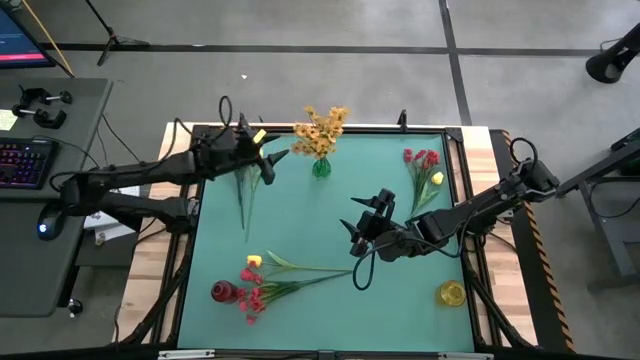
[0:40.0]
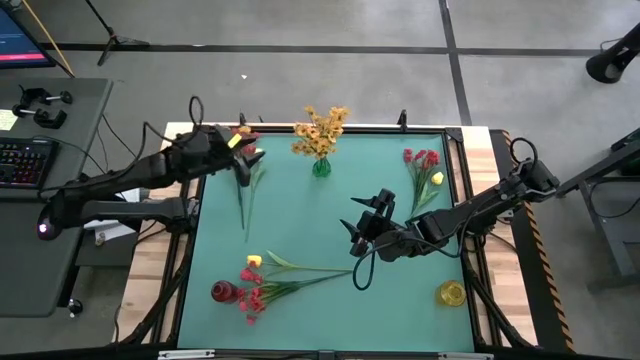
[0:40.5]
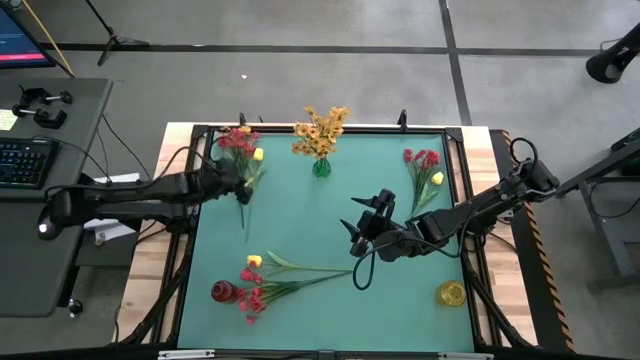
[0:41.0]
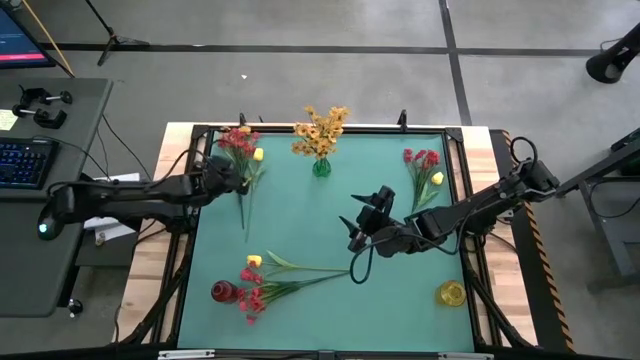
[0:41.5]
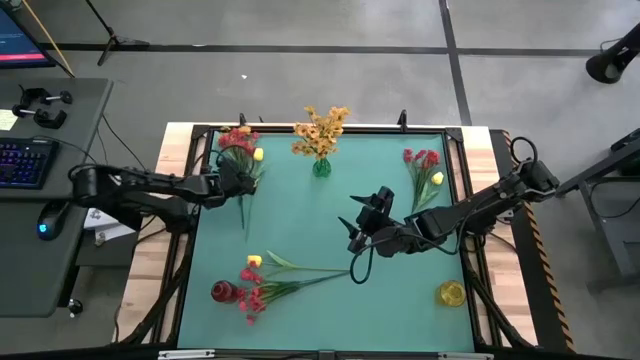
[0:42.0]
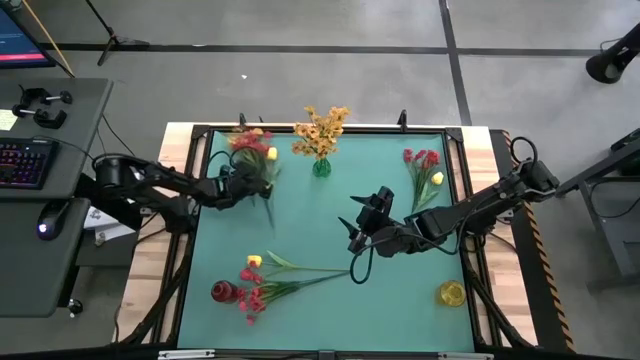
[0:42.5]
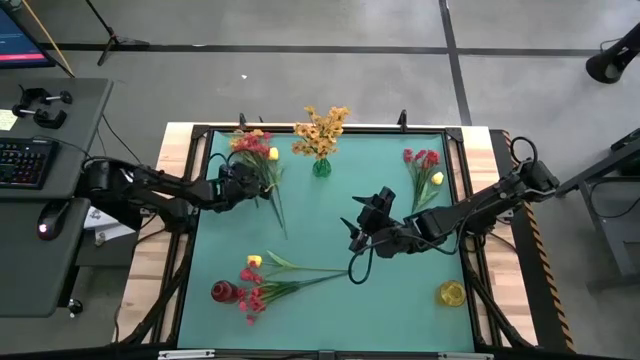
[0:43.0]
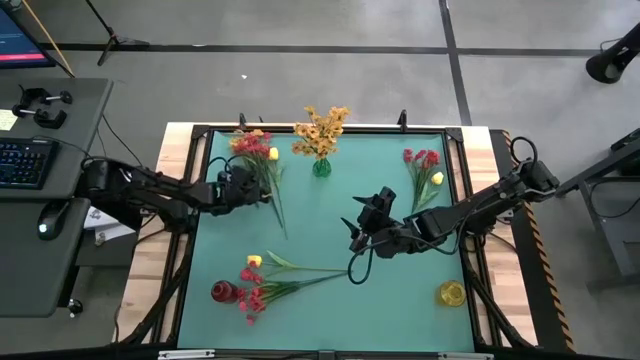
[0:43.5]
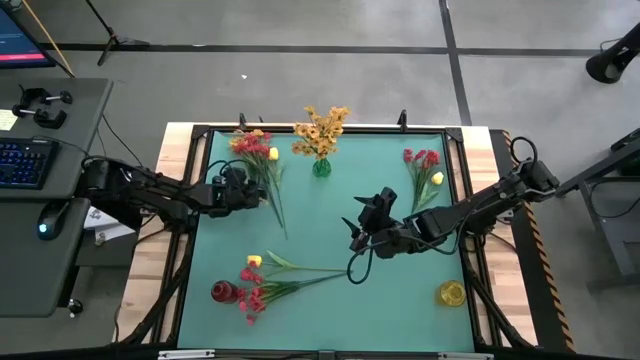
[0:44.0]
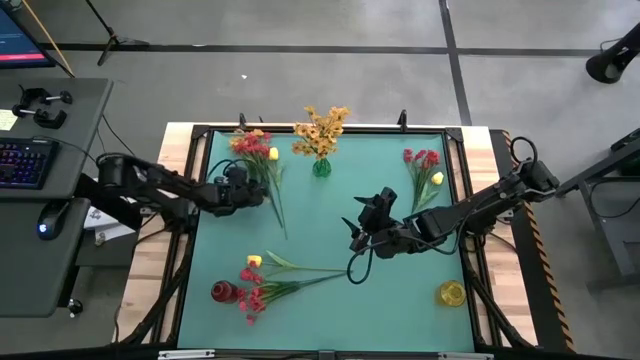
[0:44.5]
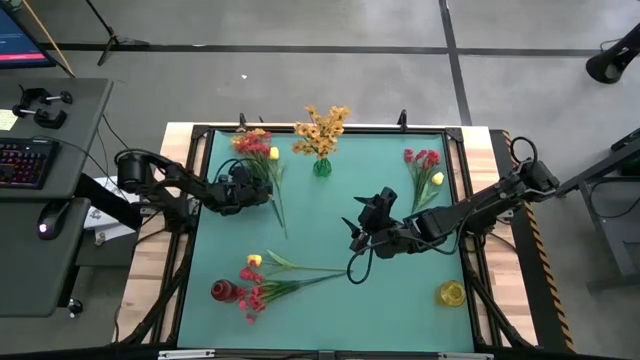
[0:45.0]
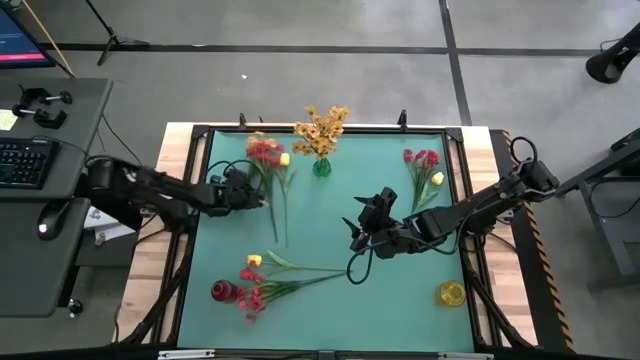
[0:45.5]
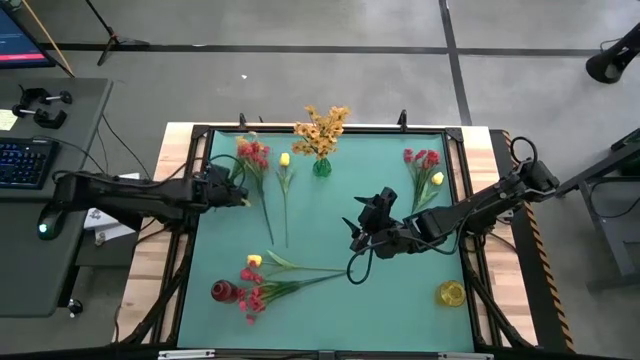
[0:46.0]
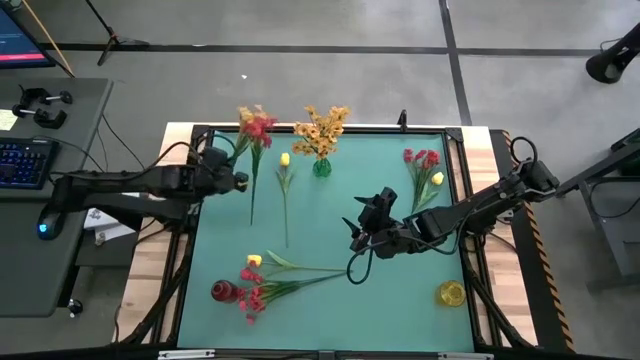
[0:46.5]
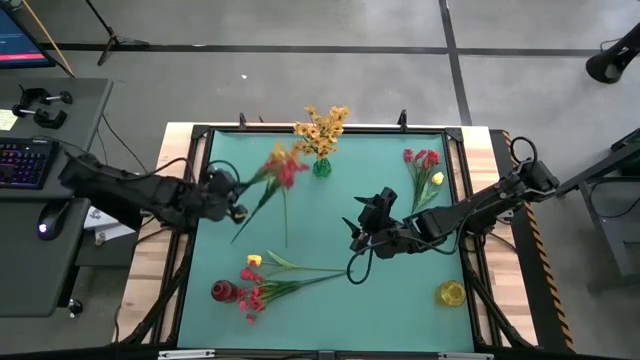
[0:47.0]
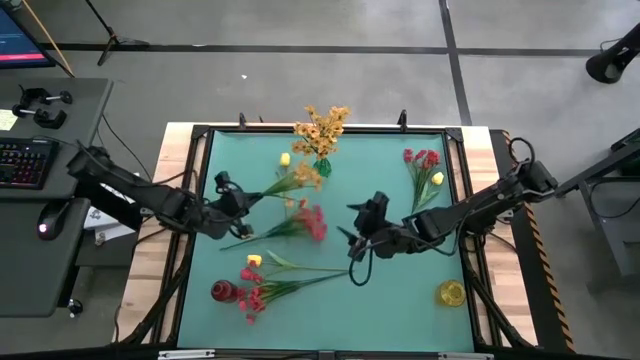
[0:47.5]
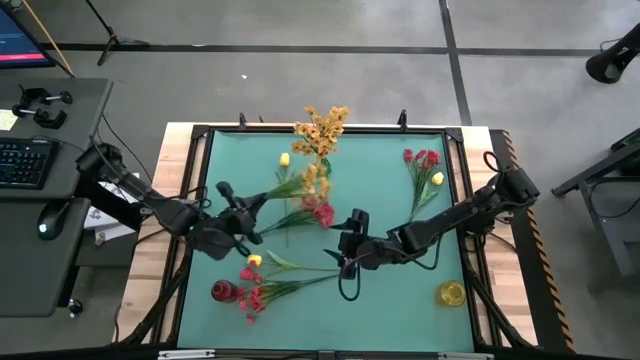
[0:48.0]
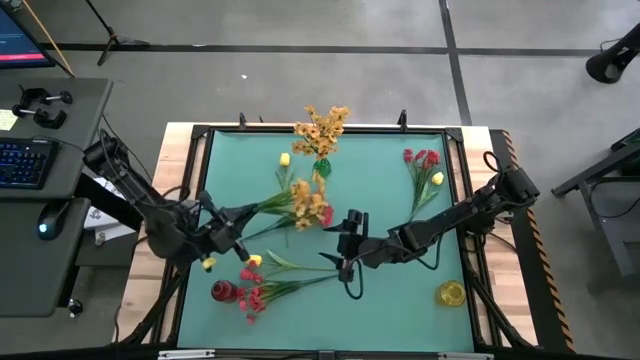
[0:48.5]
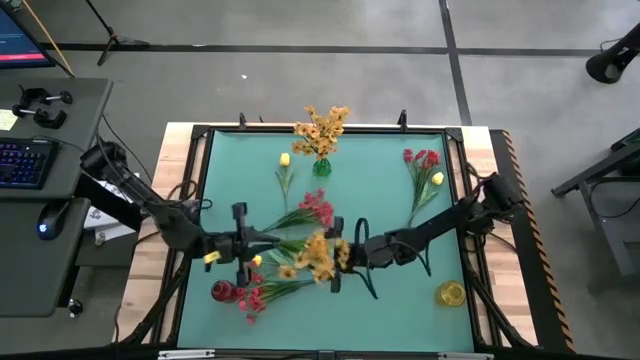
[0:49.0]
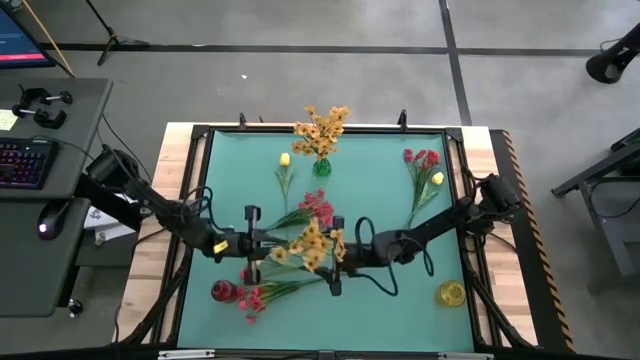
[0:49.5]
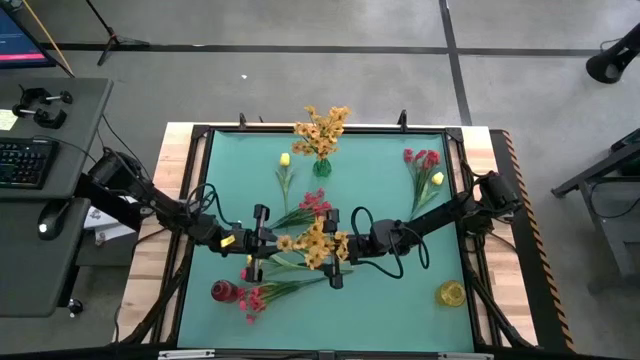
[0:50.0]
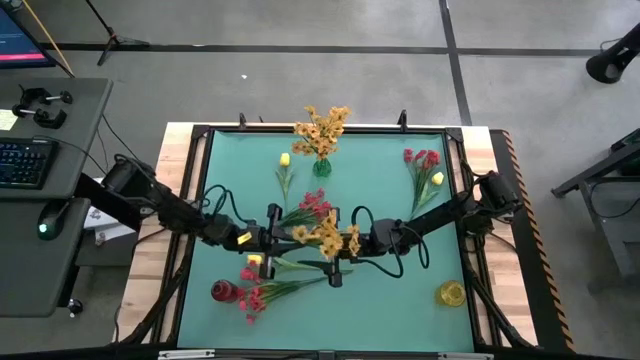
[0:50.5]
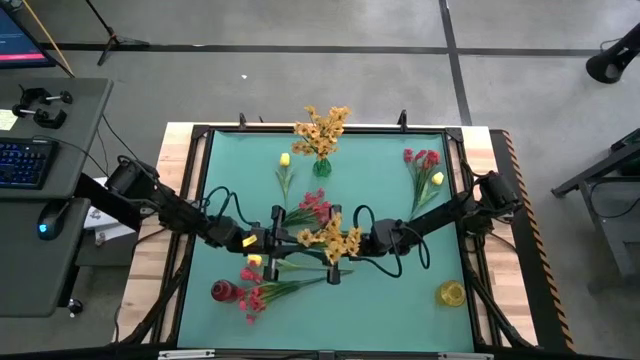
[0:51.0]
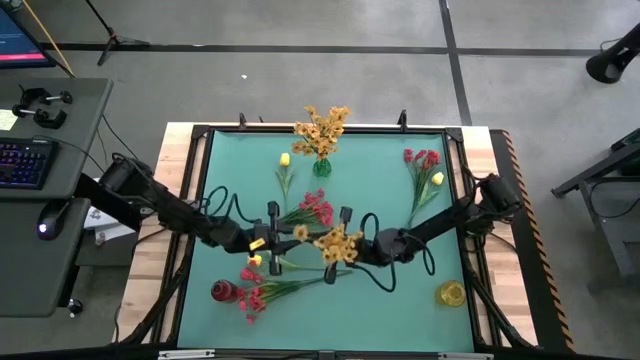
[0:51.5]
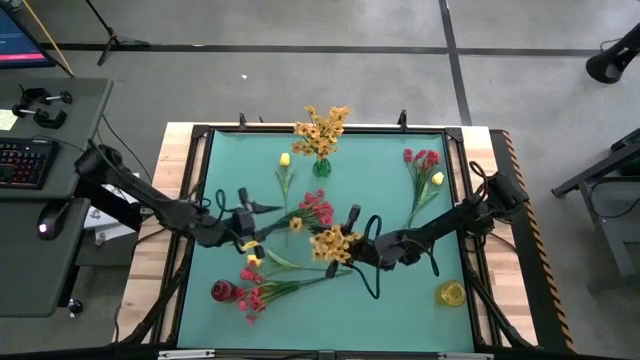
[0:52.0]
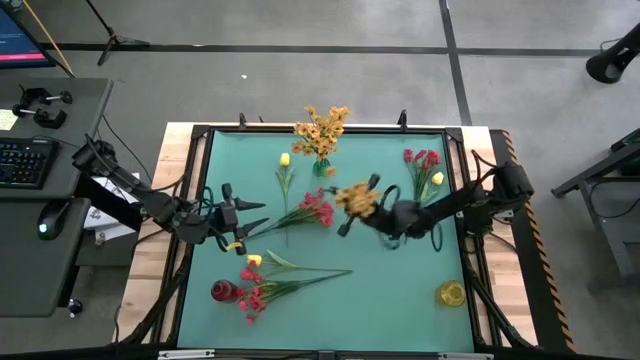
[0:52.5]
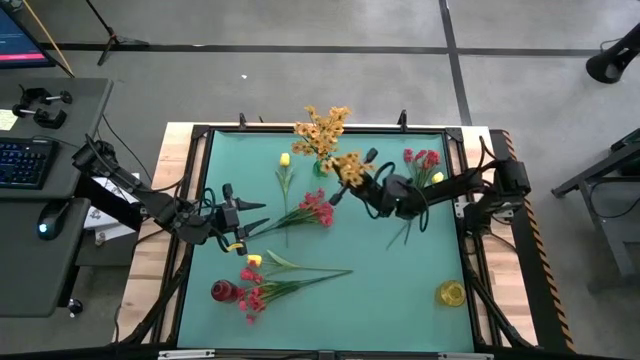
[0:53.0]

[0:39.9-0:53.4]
Task: Sort flowers into vase by color
Put the yellow flower into the green vase

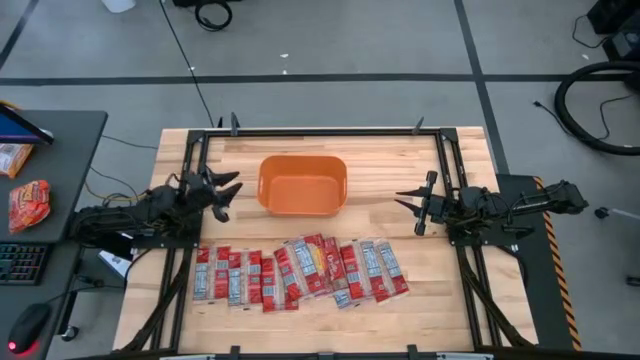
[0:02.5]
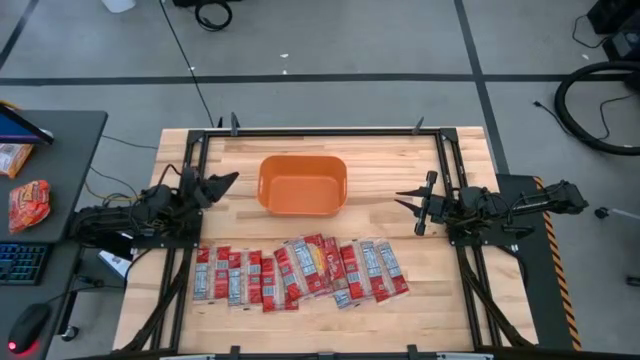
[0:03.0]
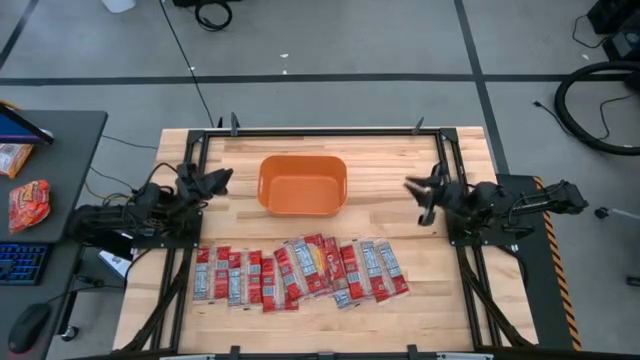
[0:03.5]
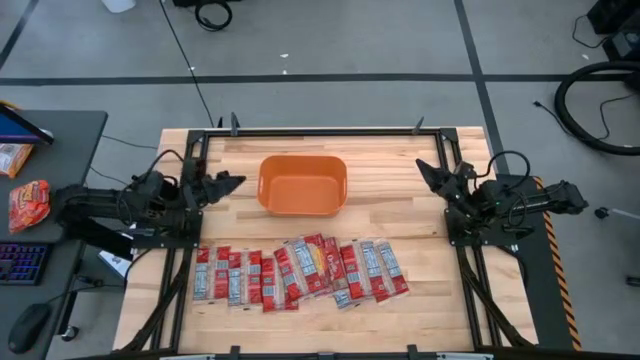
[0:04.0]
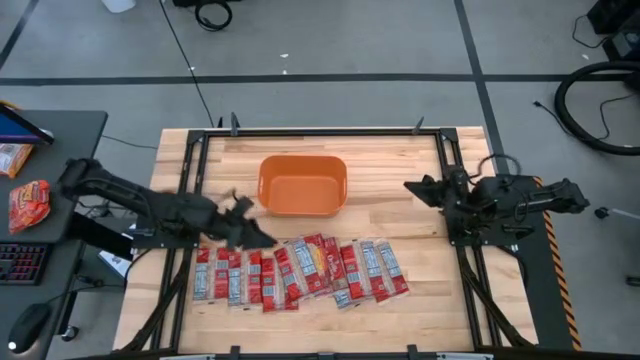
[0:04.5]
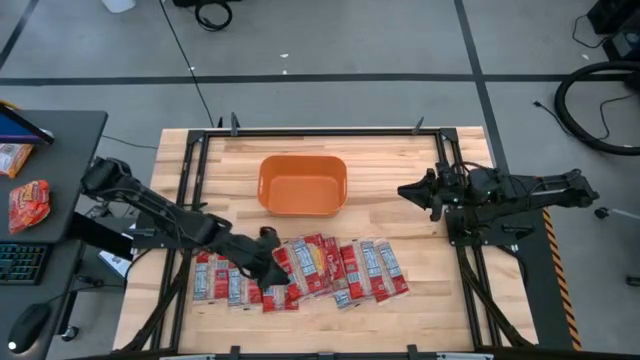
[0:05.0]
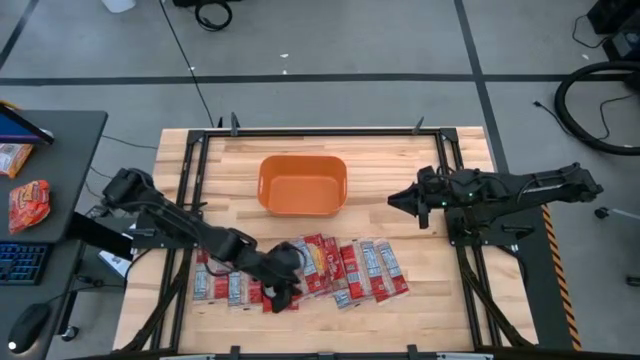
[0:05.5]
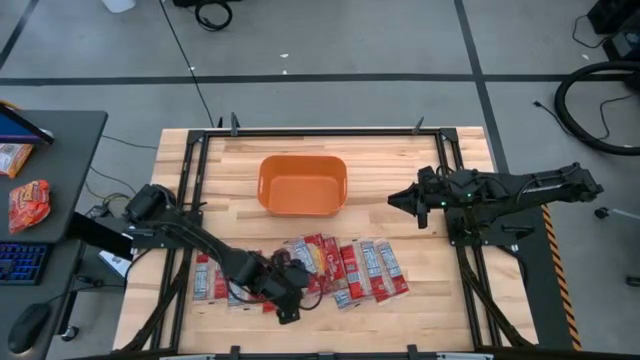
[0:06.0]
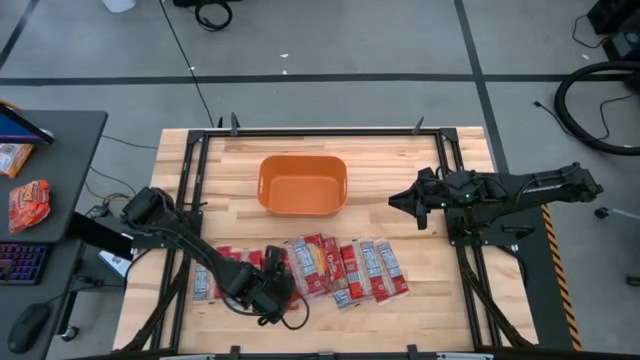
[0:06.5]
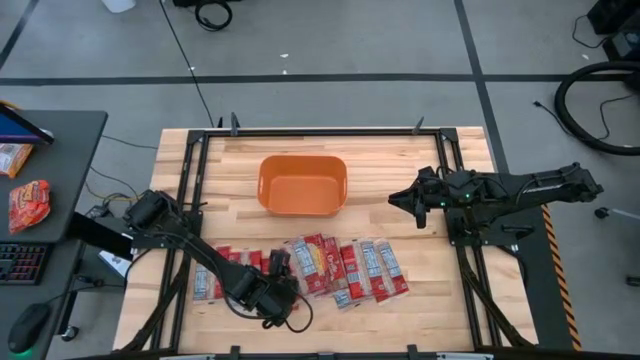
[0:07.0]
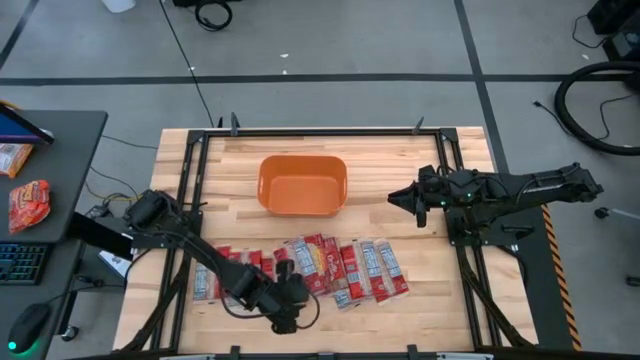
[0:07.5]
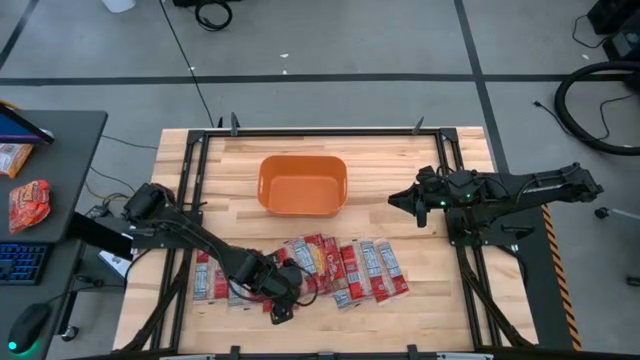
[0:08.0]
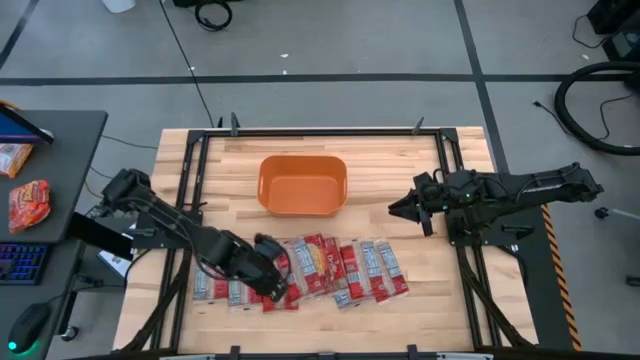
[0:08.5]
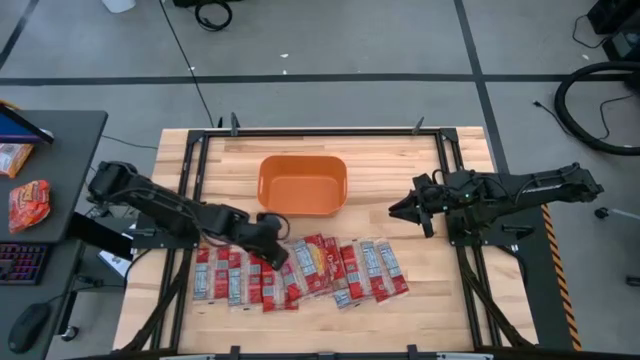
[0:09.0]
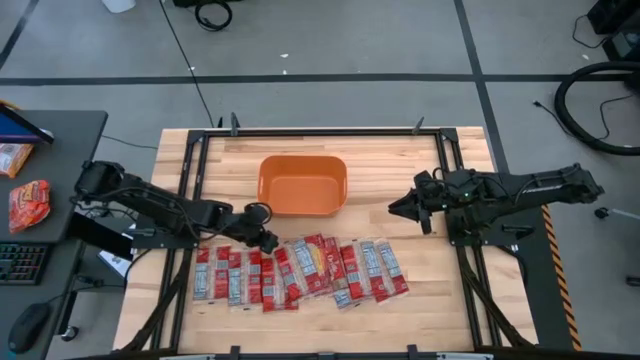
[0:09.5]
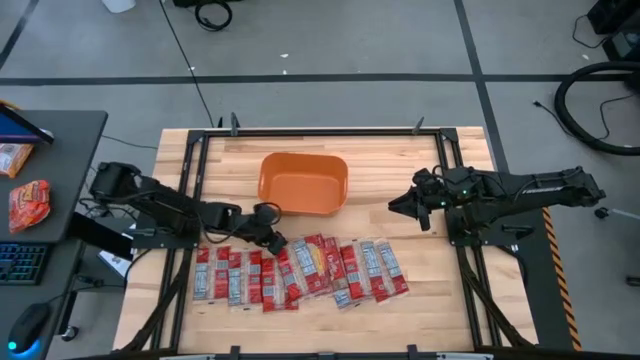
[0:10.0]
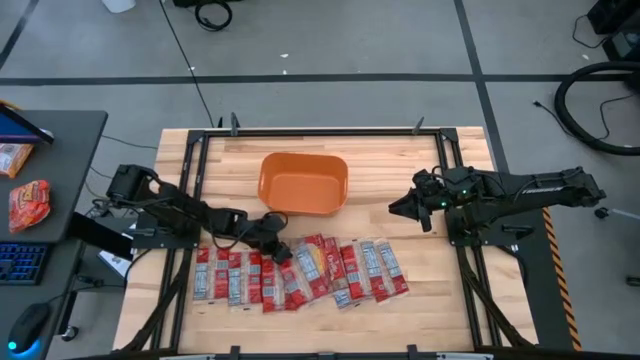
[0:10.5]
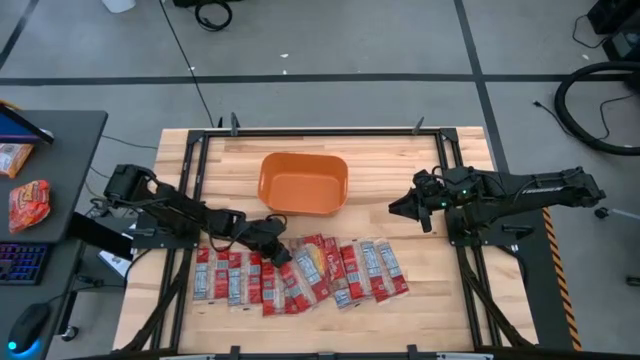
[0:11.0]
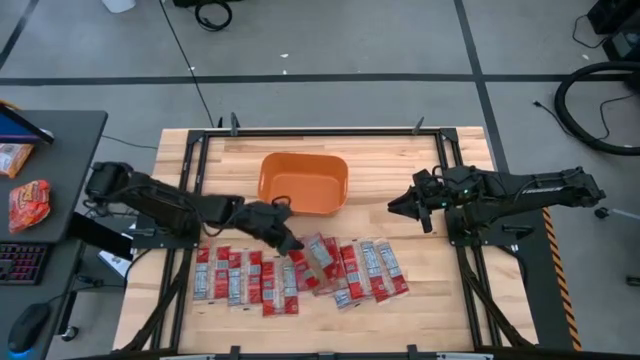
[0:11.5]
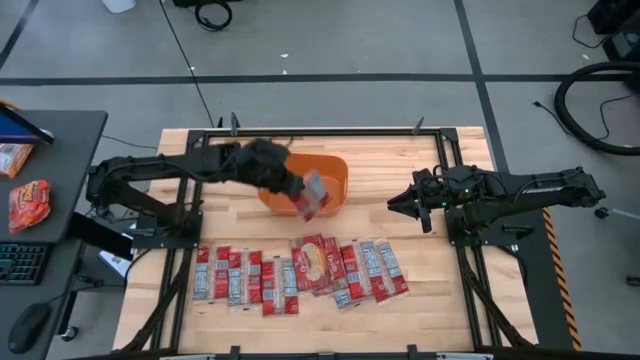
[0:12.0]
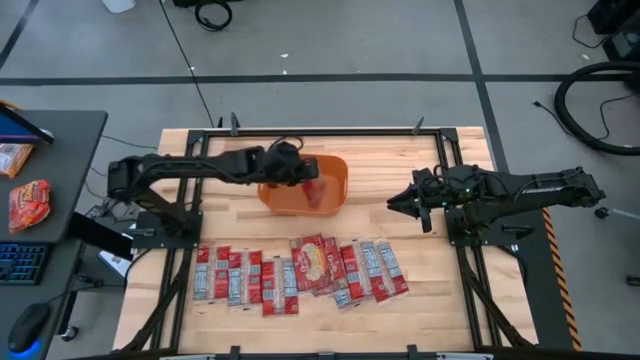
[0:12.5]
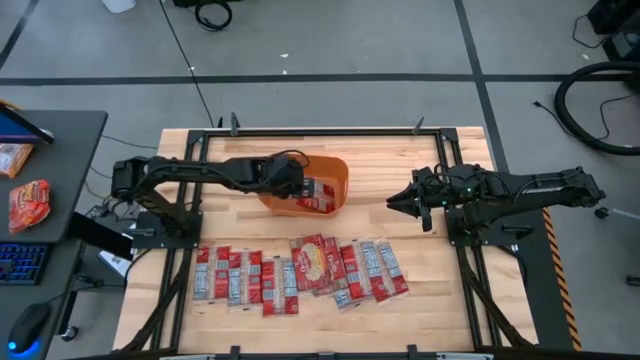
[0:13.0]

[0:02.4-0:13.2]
Task: Sort popcorn bags into baskets
Put the red popcorn bag into the orange bin
